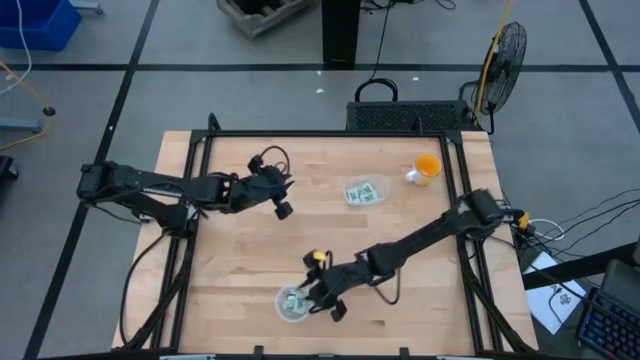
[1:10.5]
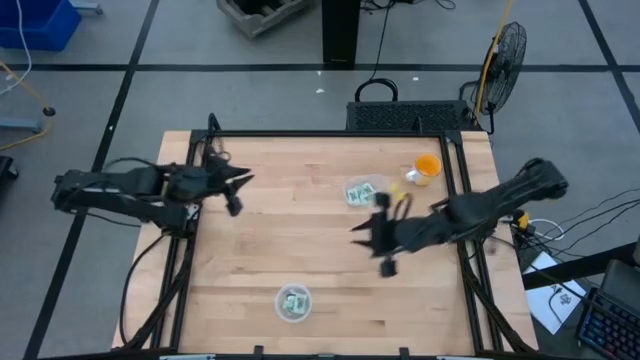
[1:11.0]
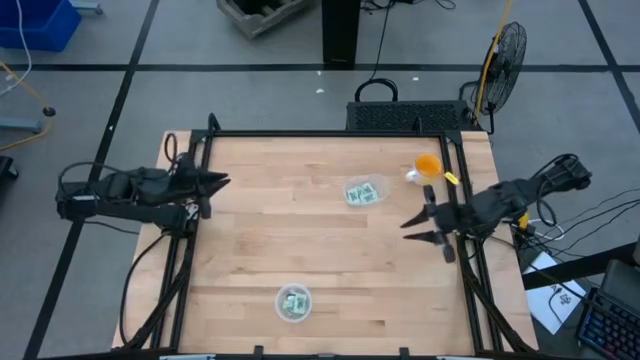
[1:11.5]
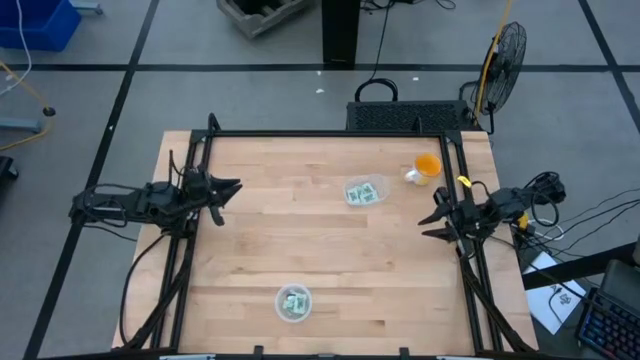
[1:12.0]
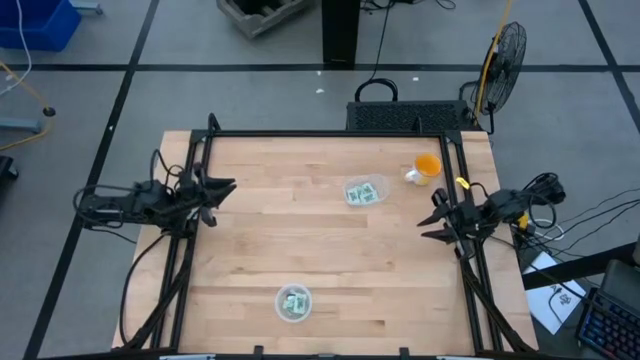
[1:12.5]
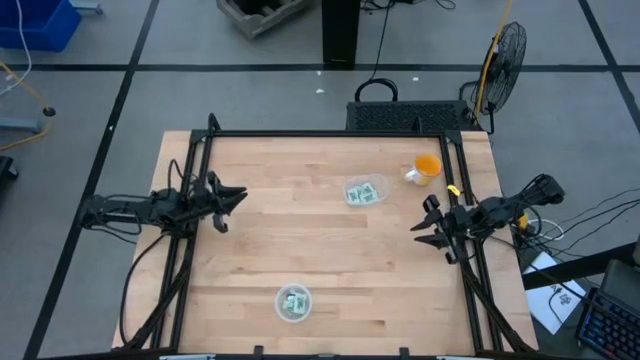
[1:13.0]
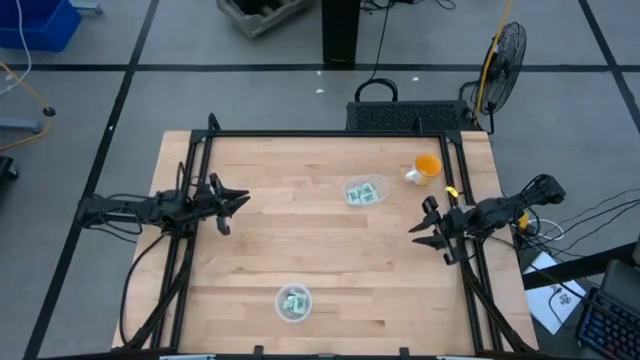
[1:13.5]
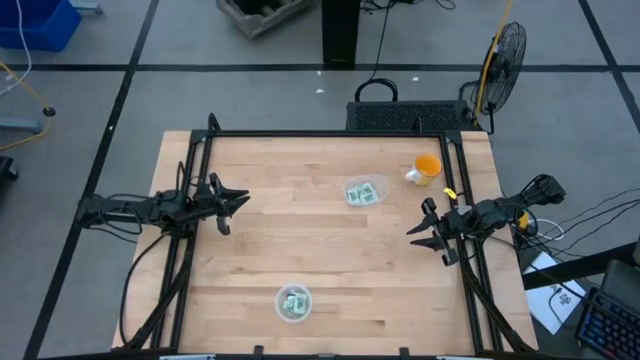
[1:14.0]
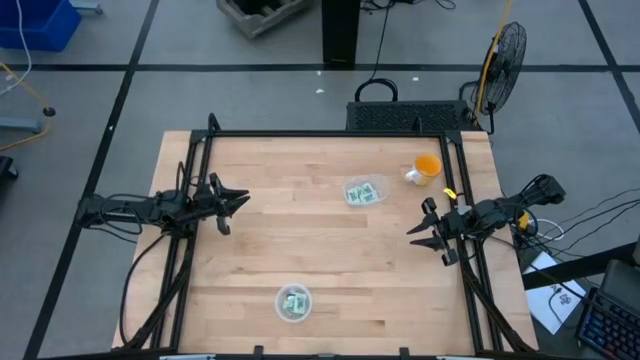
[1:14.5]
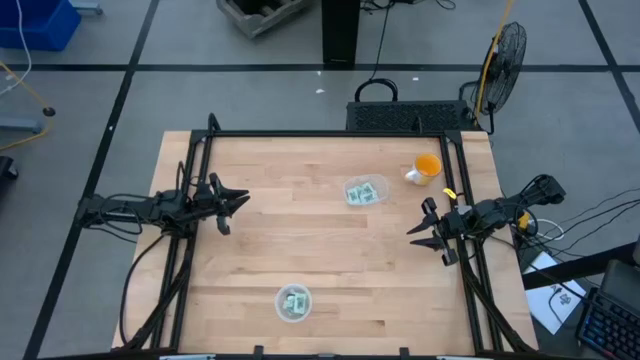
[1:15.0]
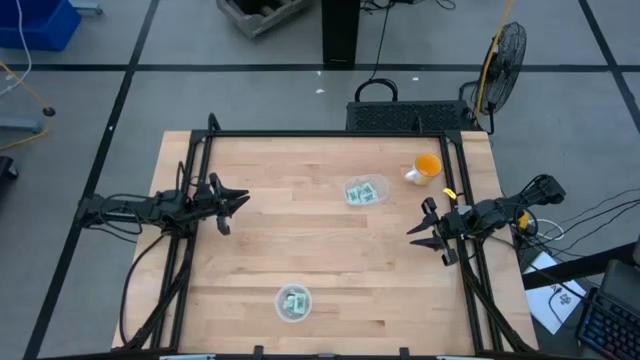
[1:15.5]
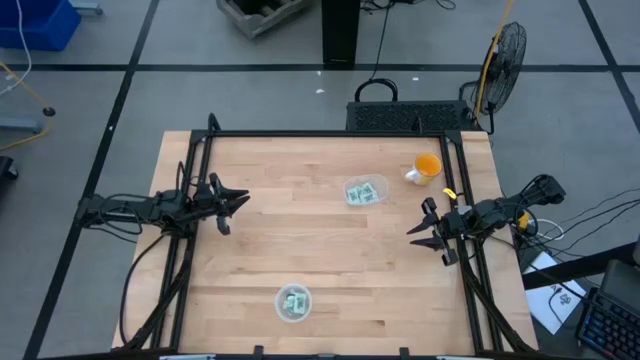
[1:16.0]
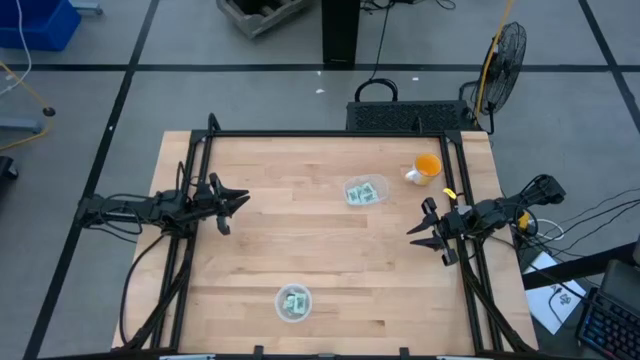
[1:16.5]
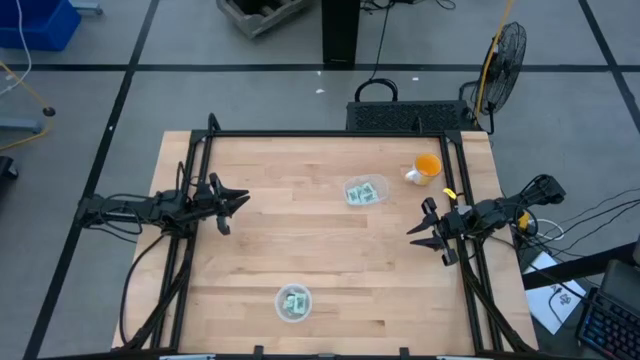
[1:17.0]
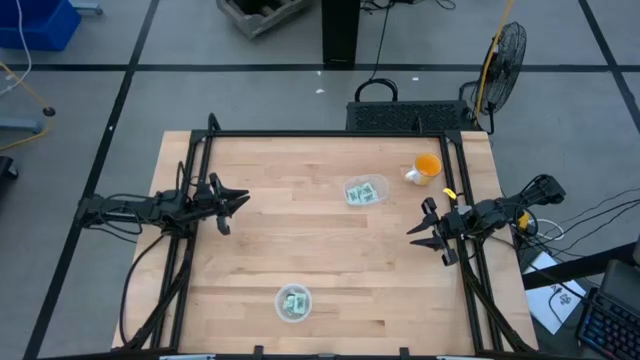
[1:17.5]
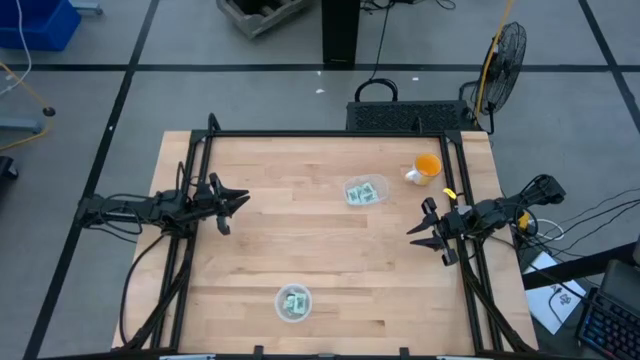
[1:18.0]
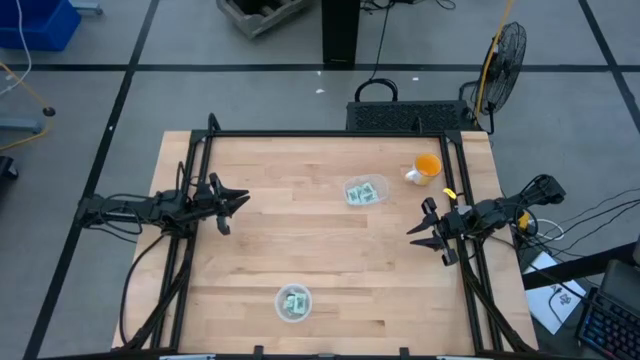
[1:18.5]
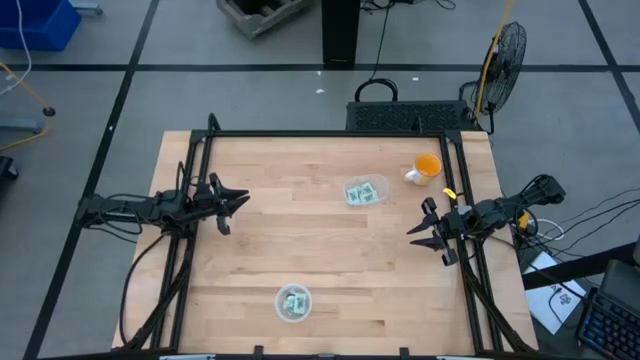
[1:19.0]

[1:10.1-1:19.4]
Task: Pick and place Stevia / Truvia into bins
Return to Home Position

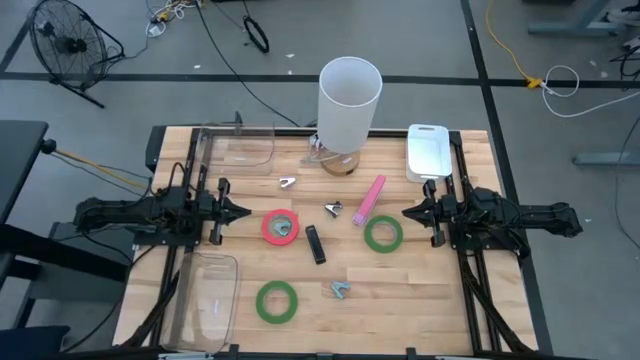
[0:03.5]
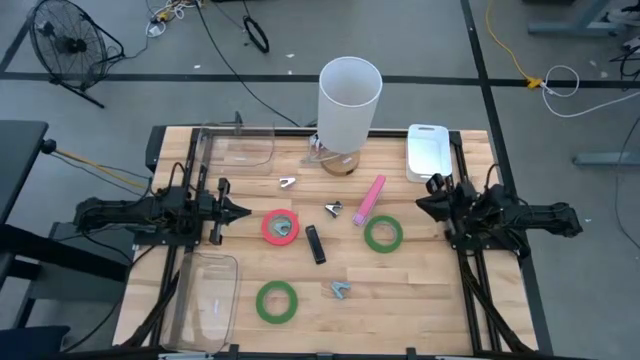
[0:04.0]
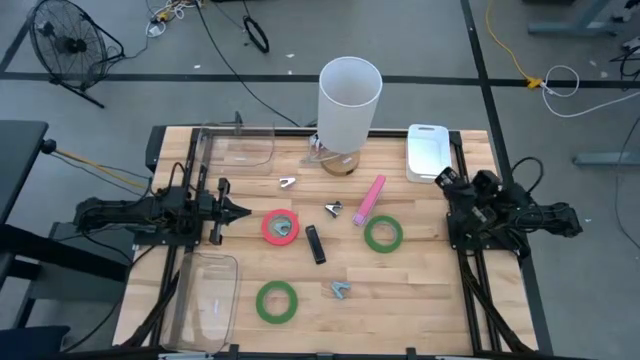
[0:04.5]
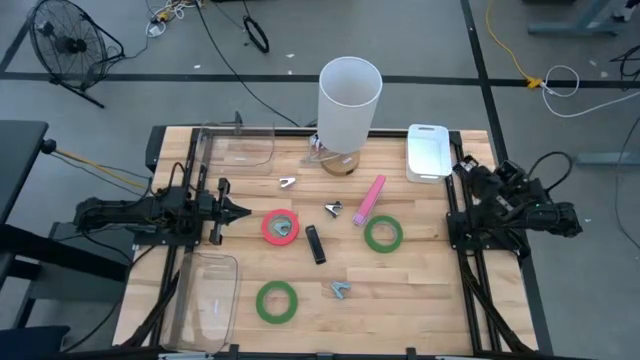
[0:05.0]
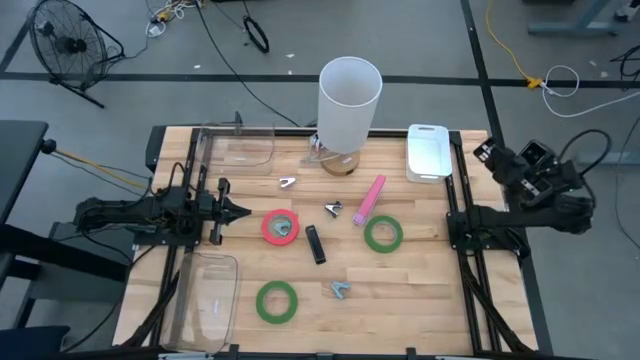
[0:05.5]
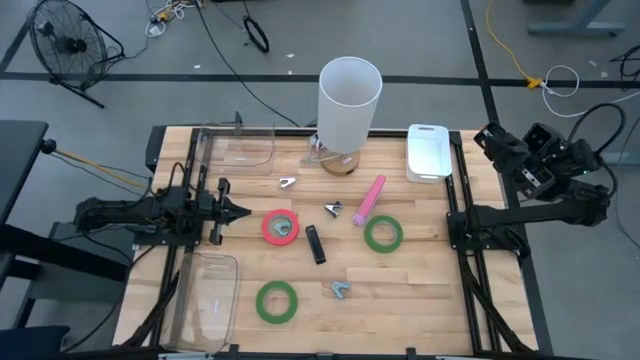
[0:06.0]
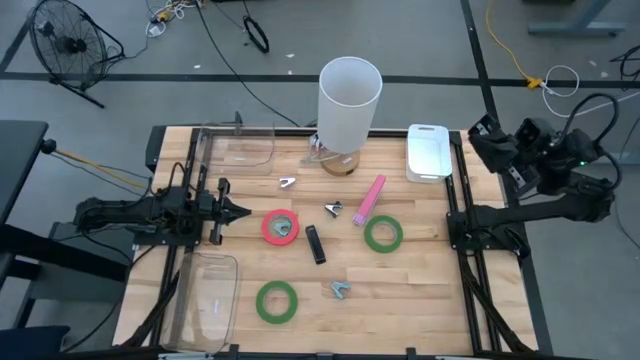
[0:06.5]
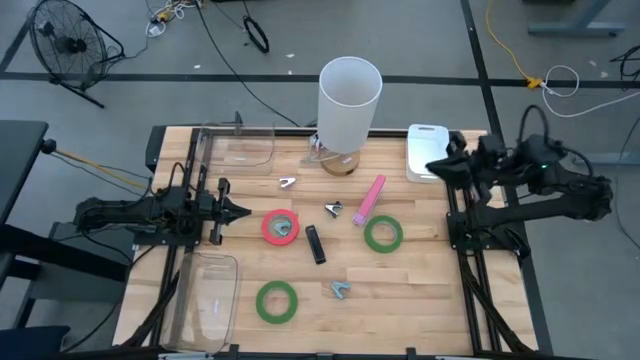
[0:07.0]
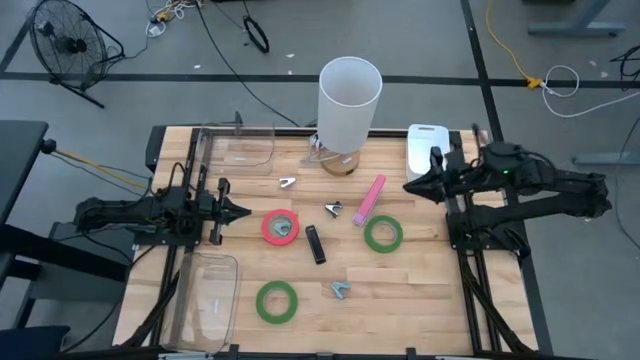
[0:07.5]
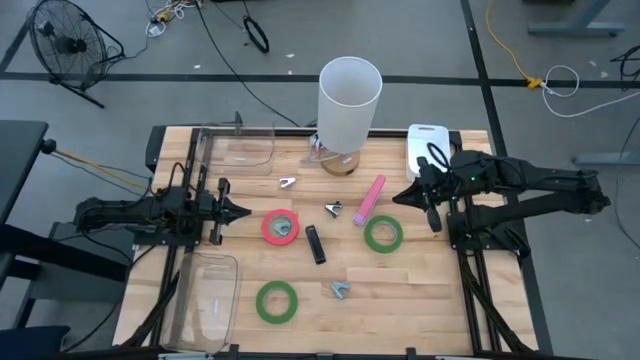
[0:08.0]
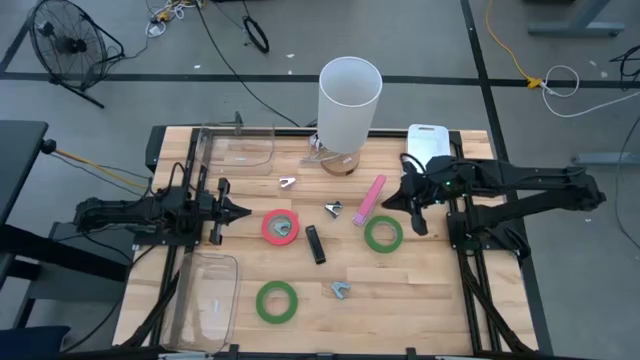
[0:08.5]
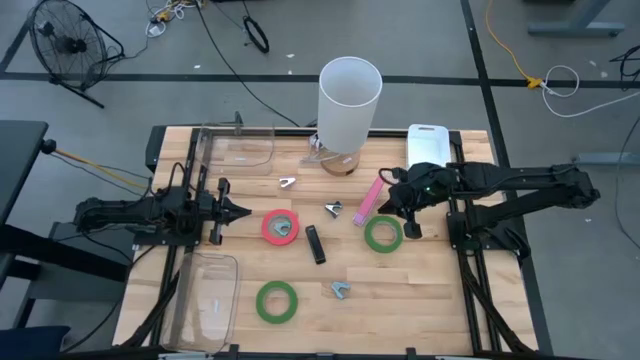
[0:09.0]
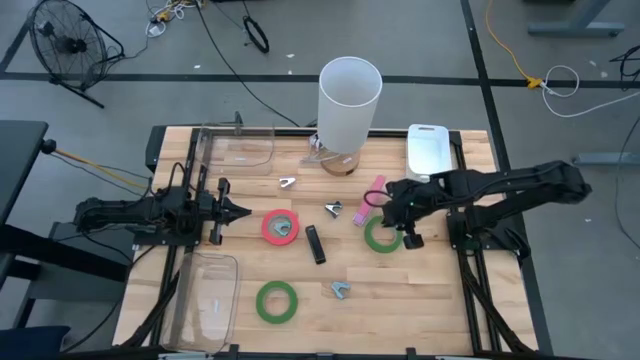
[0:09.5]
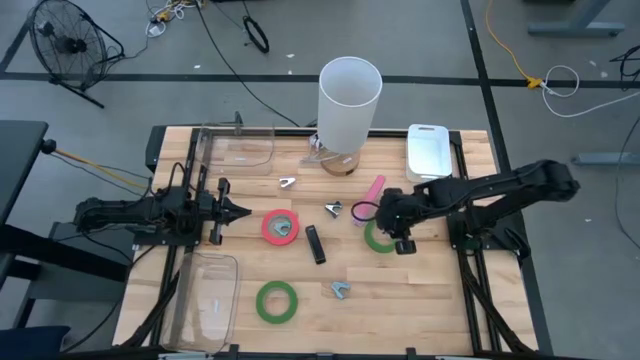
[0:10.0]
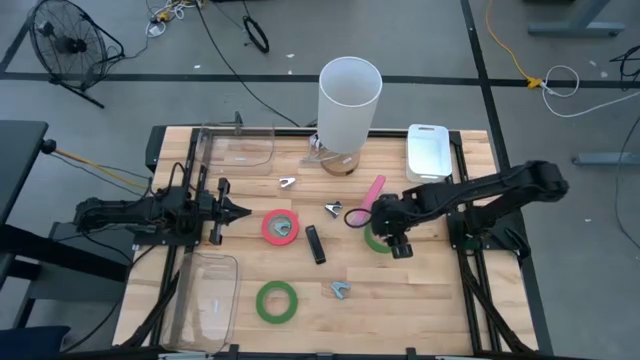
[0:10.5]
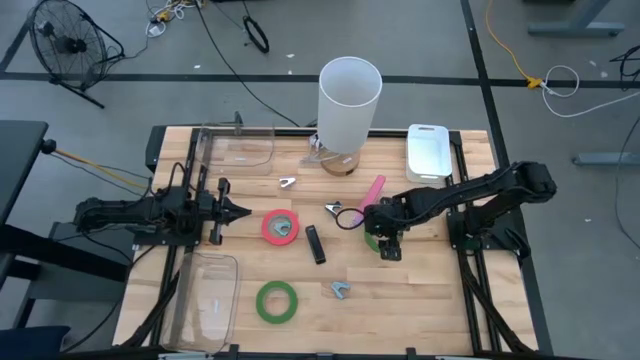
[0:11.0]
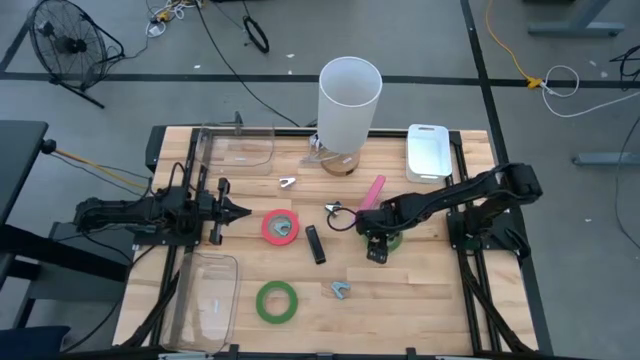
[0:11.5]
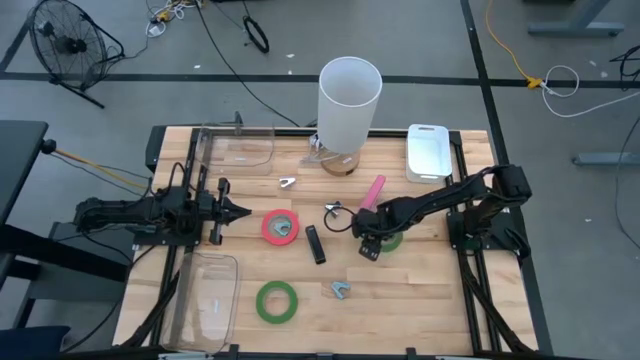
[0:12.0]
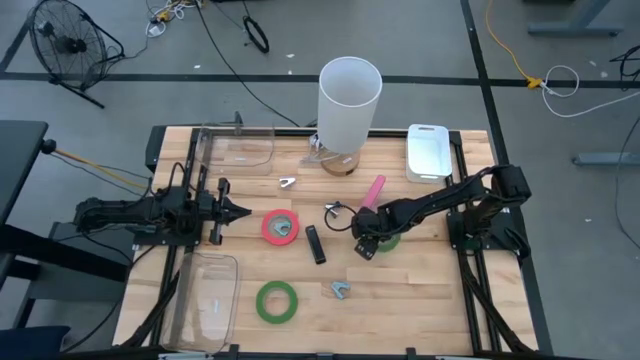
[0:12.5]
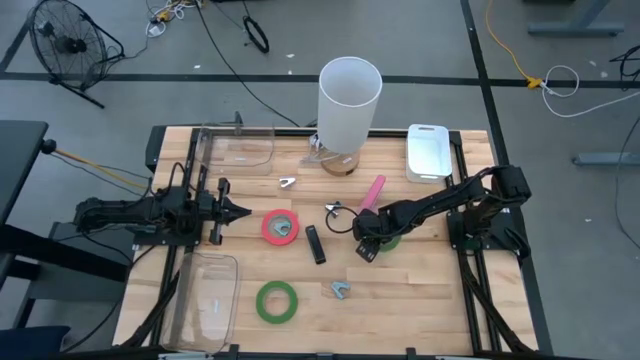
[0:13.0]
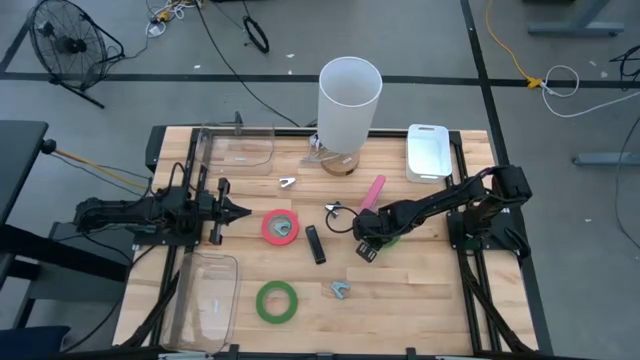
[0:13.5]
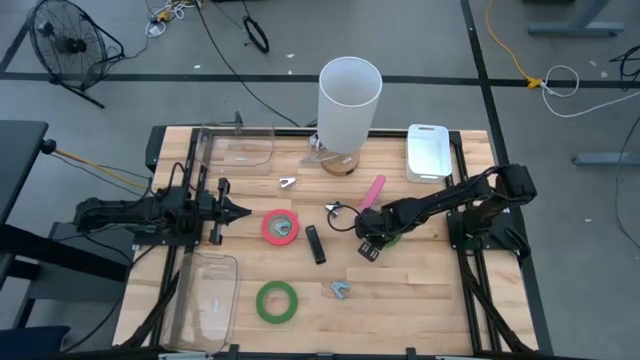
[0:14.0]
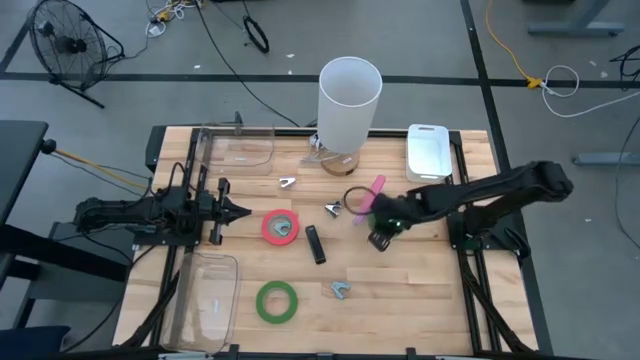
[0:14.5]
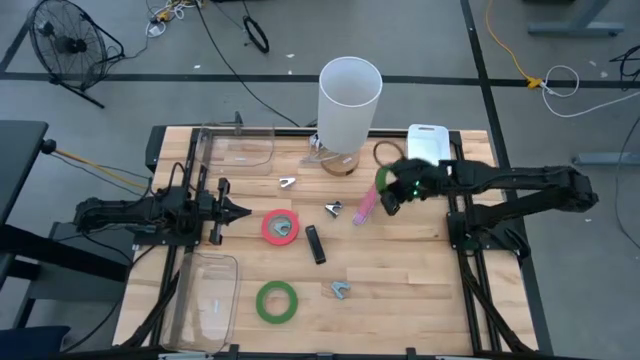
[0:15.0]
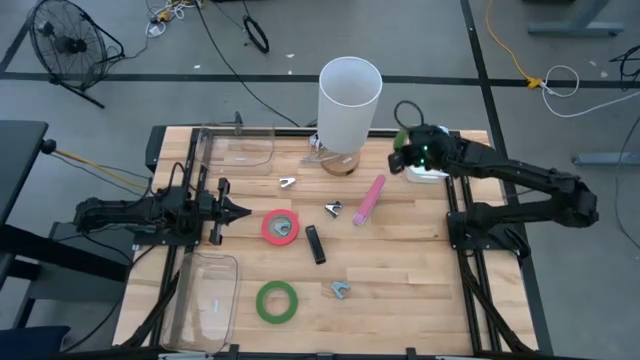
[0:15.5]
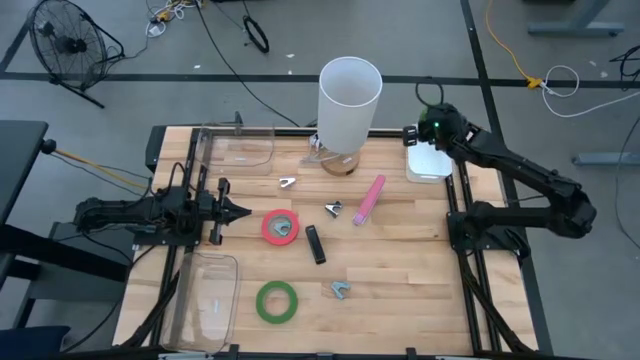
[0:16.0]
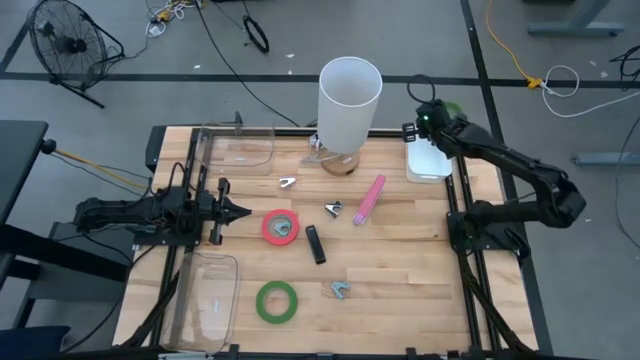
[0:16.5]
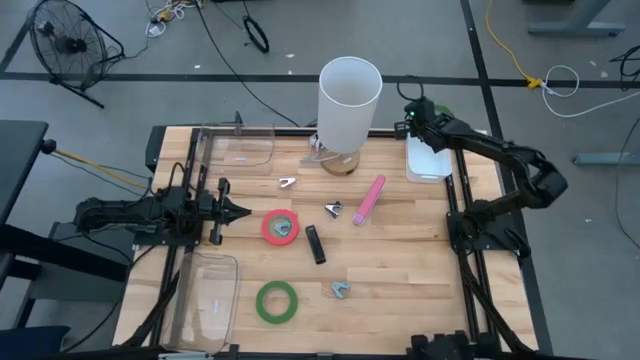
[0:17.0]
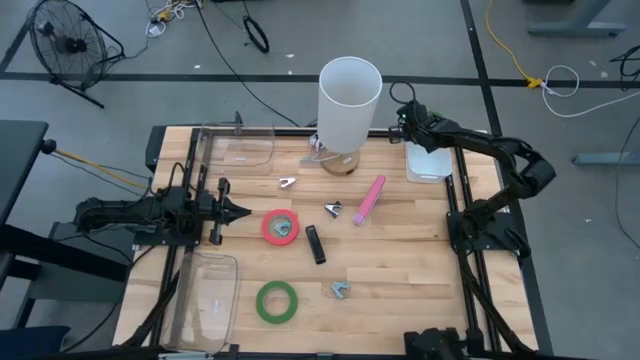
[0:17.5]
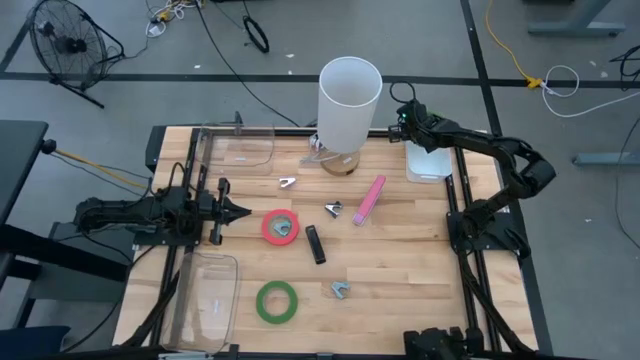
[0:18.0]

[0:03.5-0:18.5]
Task: Pick and place Stapler, Stapler remover, tape
Put the top green tape into the white bin
